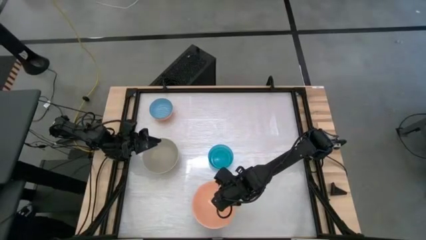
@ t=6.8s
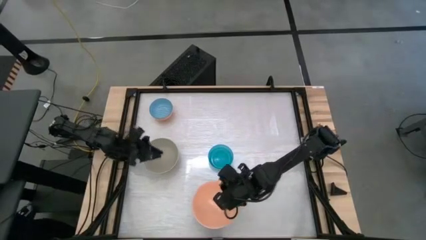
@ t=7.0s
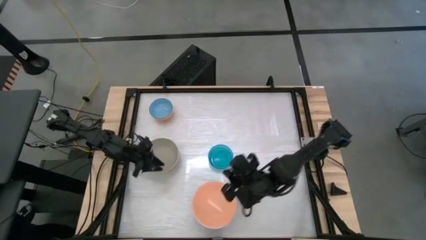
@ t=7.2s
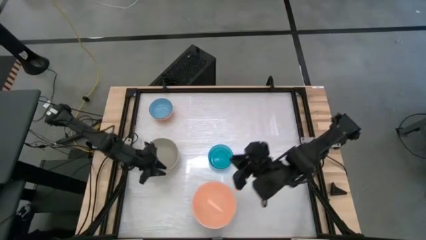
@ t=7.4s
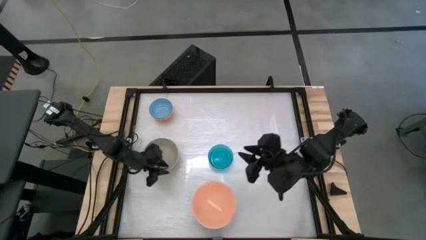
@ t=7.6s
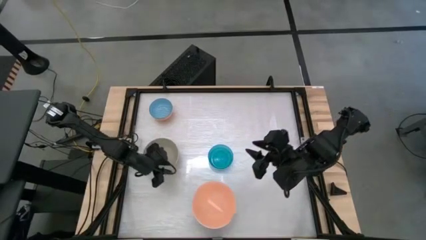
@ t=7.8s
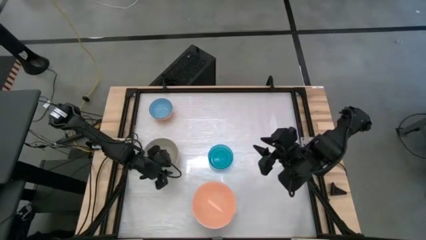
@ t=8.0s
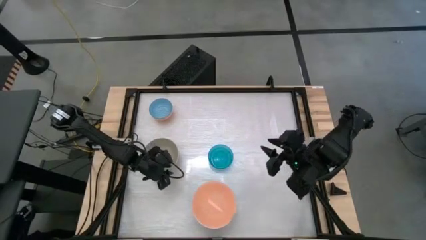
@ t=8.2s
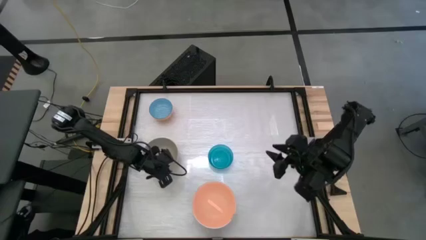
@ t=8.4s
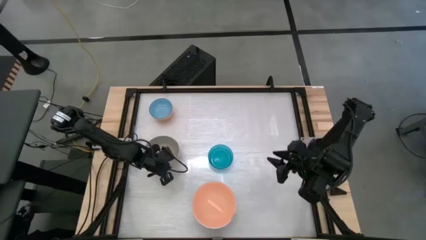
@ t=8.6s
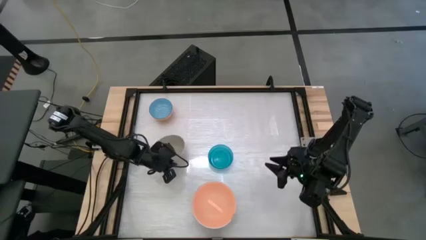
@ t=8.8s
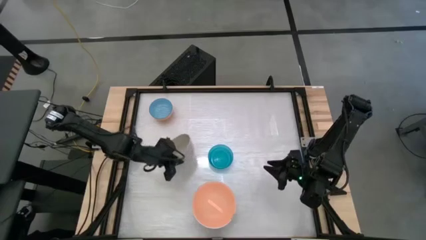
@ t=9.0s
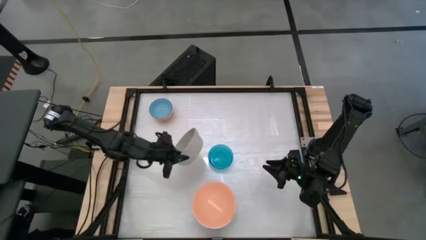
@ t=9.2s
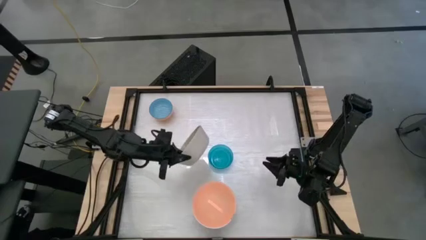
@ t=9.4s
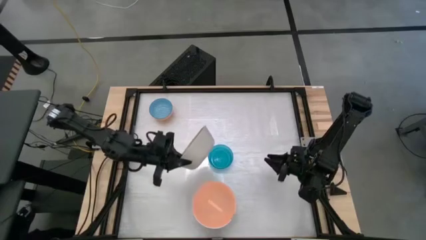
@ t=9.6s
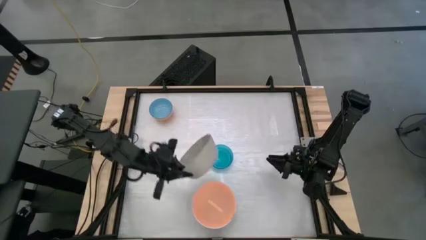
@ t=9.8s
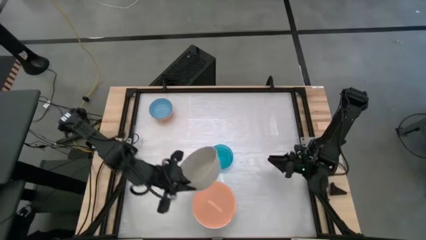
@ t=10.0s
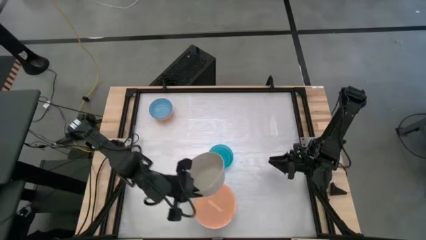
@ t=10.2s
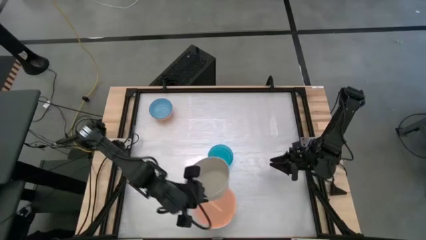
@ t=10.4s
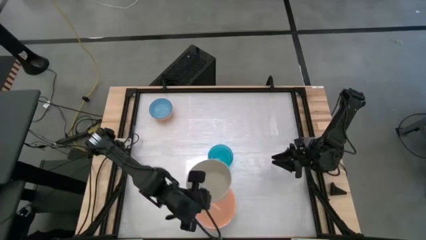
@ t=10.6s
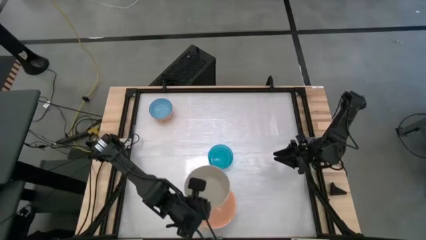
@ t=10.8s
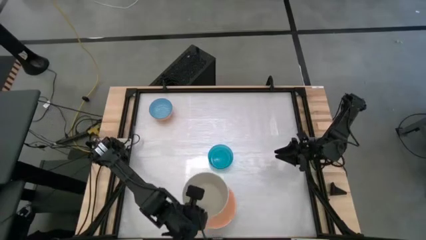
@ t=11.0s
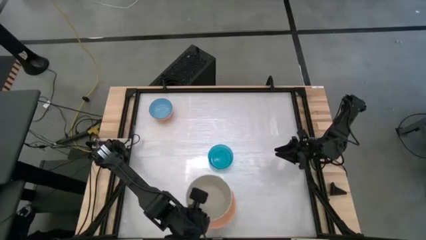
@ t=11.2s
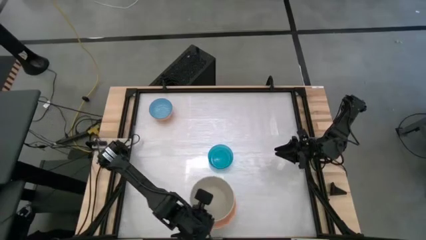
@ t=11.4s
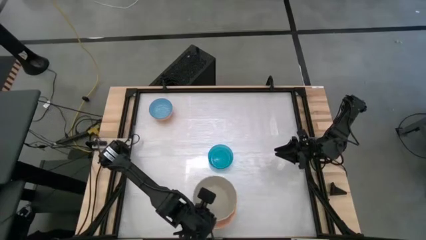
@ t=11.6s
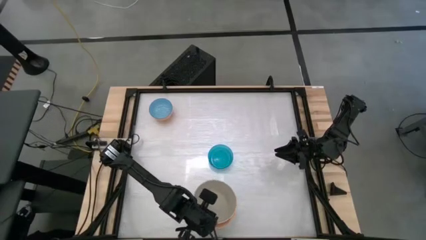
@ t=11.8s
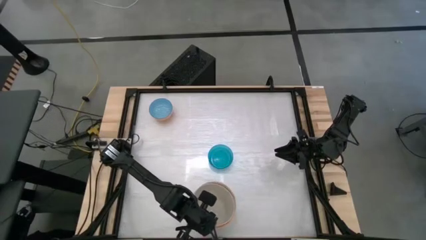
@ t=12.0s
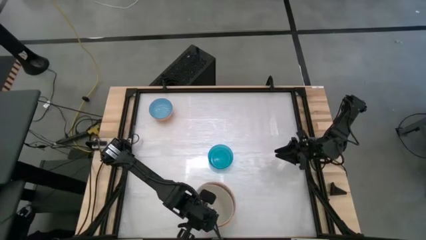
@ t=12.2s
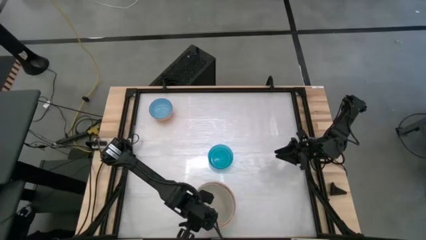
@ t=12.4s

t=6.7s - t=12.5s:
Stack the gray bowl on top of the light orange bowl

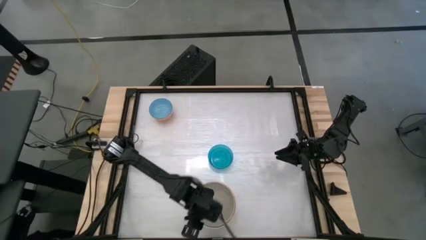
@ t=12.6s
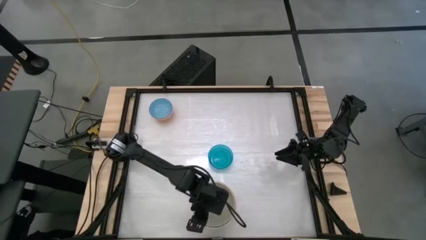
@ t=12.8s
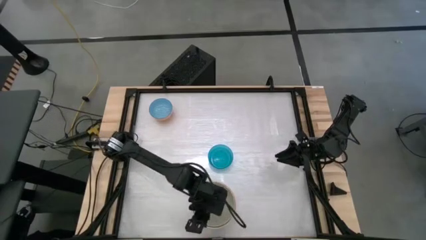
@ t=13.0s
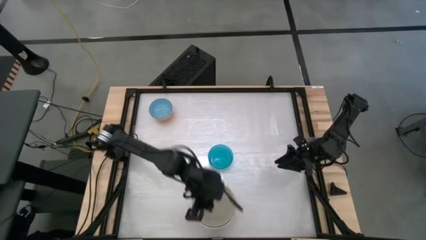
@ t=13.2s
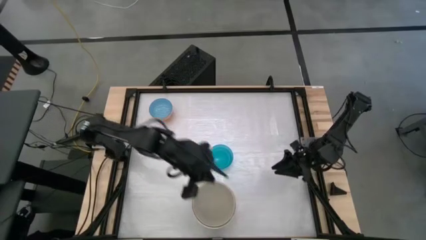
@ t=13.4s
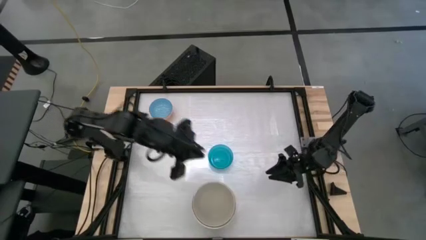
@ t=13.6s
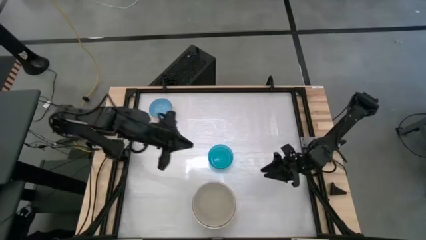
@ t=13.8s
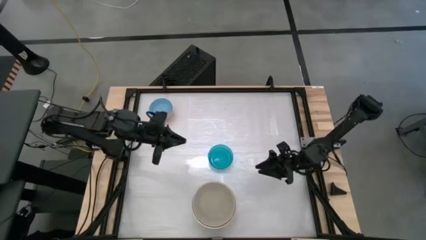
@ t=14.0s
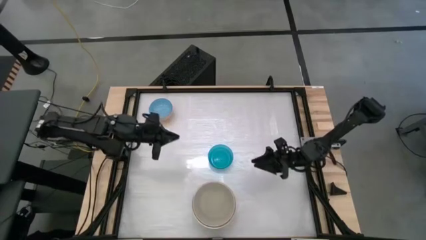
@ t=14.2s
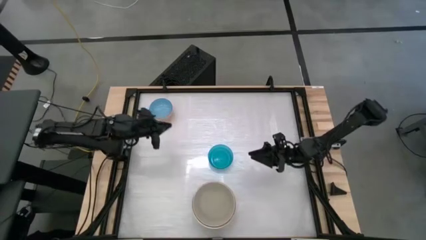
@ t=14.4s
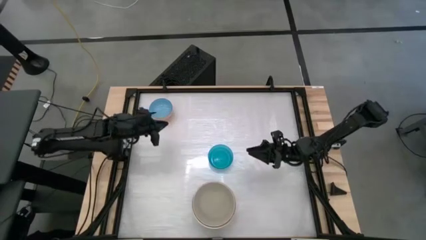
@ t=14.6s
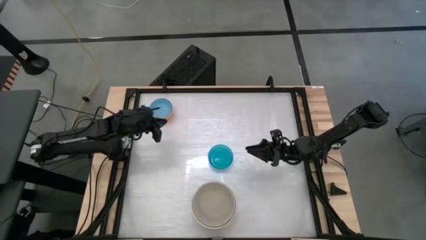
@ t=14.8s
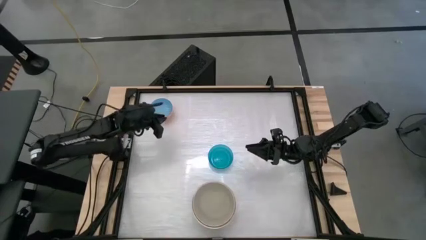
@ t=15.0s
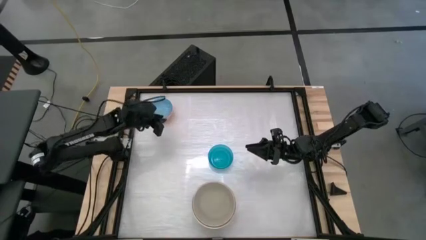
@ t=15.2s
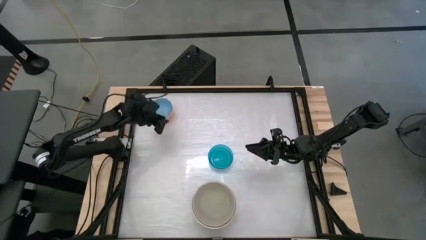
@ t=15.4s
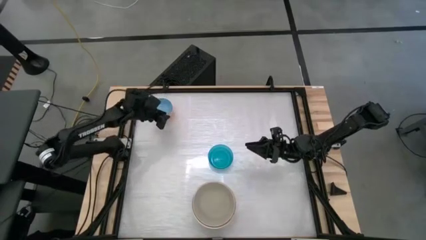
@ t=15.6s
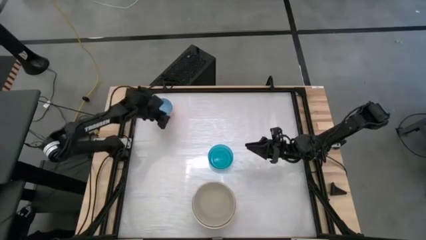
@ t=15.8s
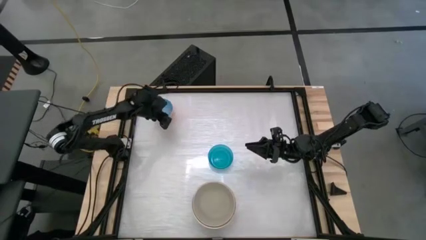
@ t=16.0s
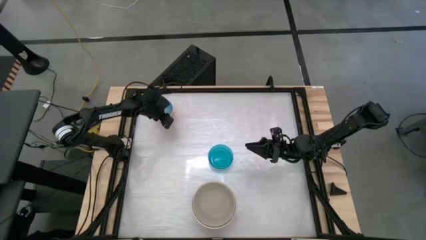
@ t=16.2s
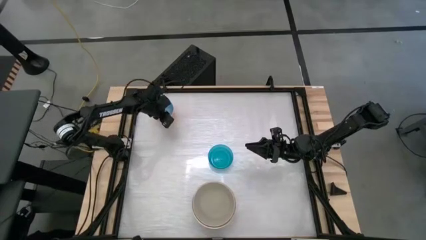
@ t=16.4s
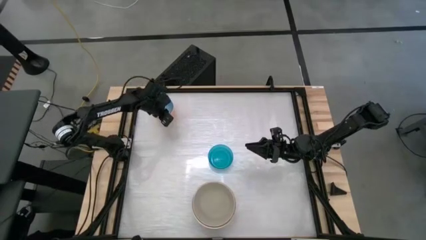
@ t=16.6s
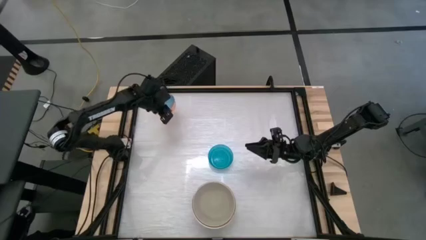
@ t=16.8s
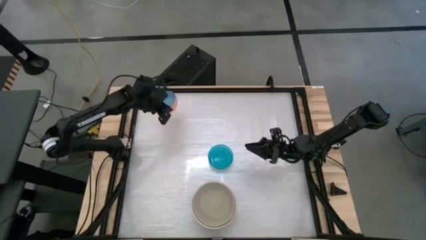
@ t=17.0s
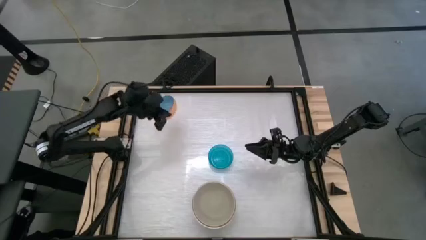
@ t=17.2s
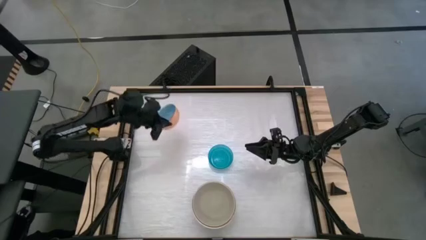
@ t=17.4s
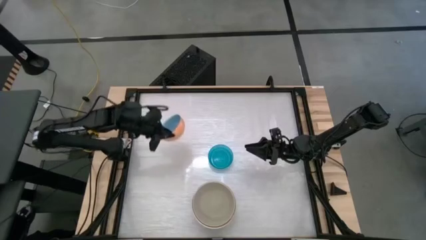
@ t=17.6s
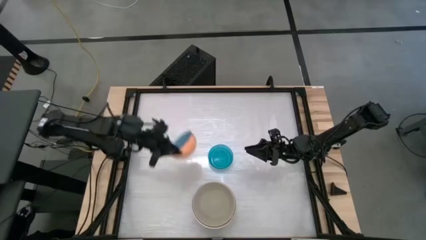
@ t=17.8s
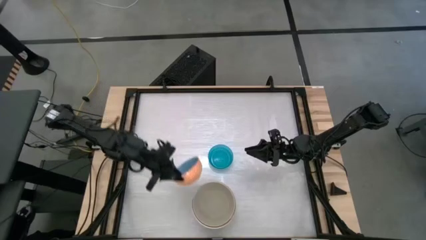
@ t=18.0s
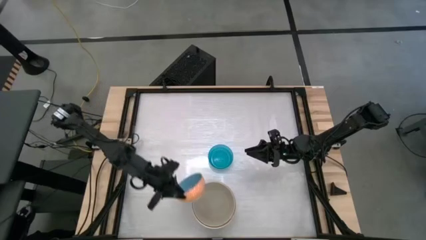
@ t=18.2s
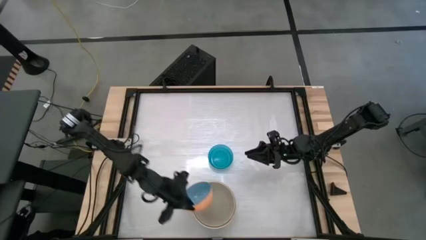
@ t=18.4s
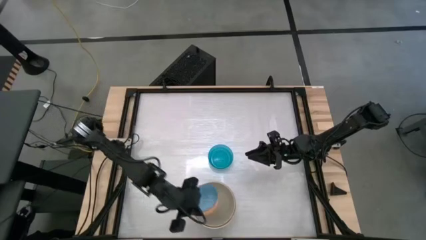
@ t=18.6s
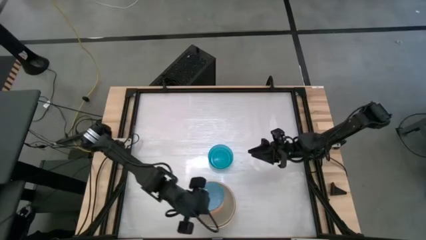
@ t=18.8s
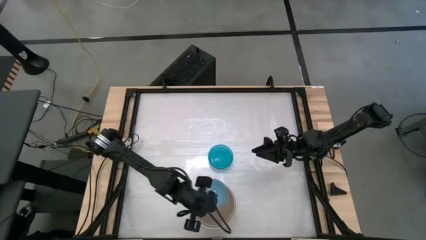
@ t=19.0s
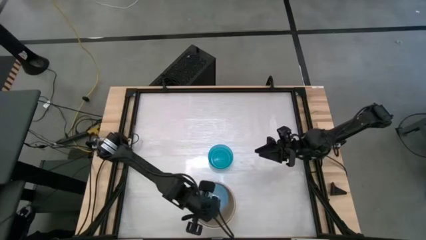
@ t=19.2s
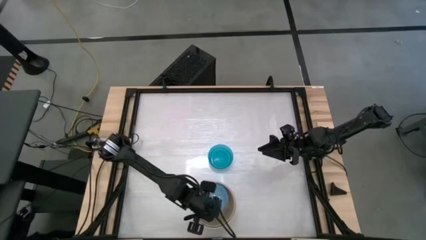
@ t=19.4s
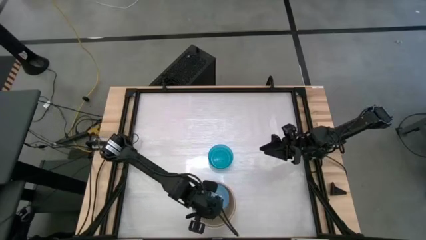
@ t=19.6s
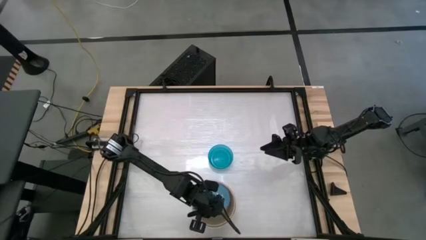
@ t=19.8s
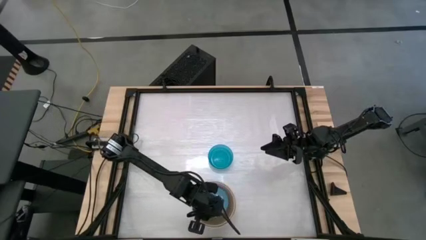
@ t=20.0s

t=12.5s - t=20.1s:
Stack the blue patterned bowl on top of the gray bowl
